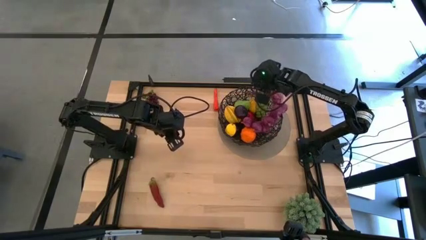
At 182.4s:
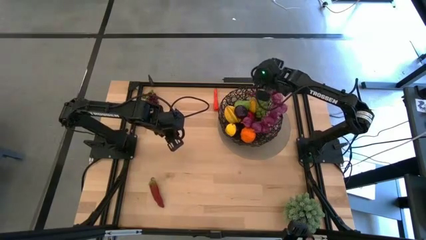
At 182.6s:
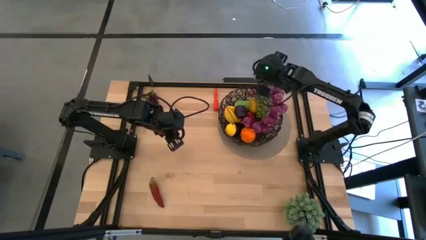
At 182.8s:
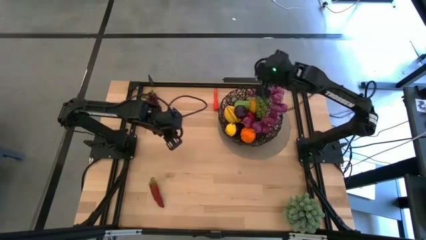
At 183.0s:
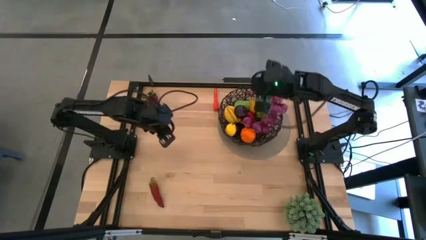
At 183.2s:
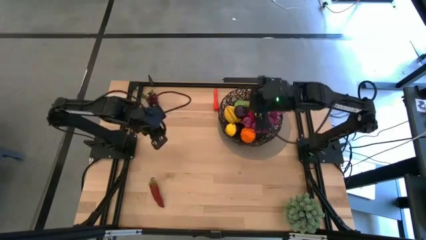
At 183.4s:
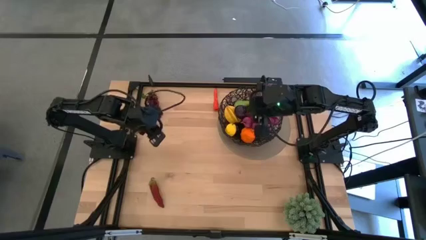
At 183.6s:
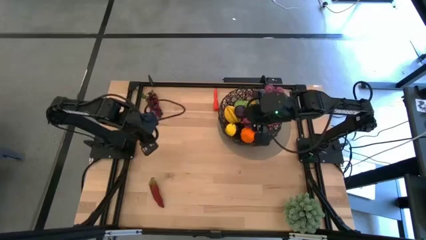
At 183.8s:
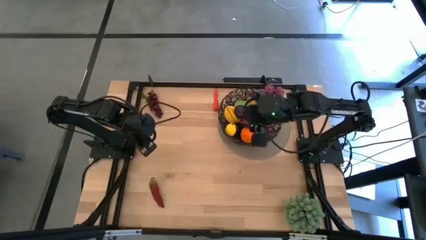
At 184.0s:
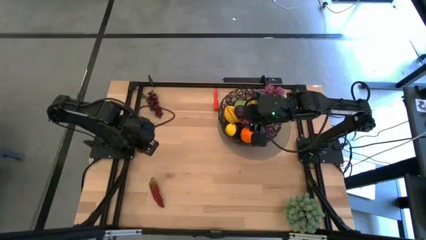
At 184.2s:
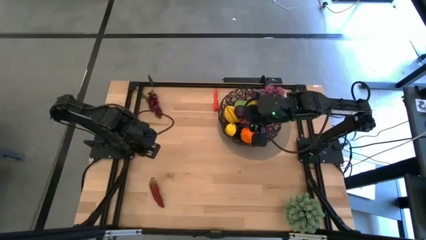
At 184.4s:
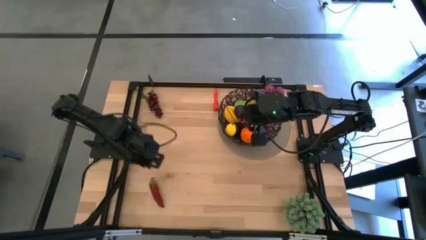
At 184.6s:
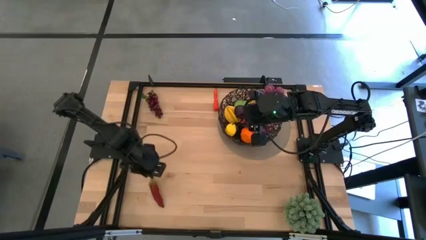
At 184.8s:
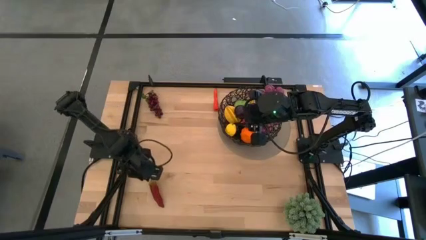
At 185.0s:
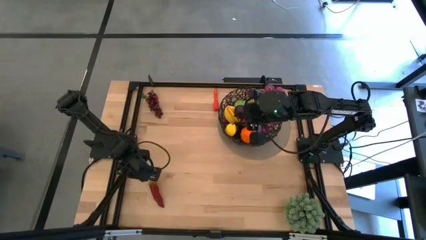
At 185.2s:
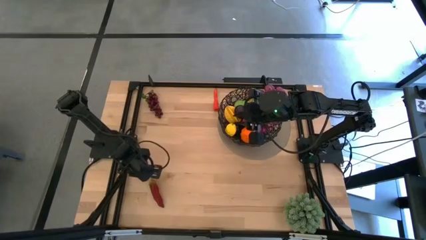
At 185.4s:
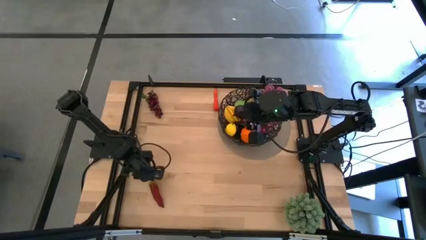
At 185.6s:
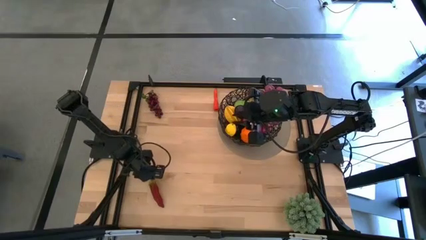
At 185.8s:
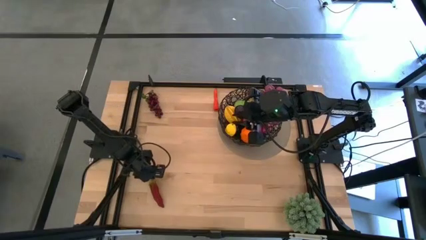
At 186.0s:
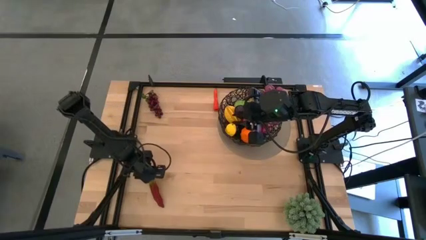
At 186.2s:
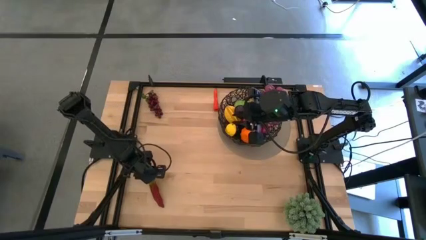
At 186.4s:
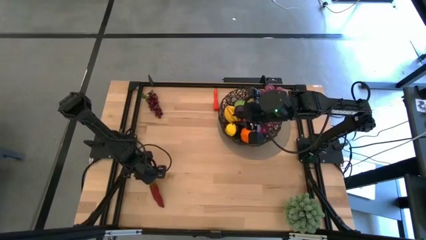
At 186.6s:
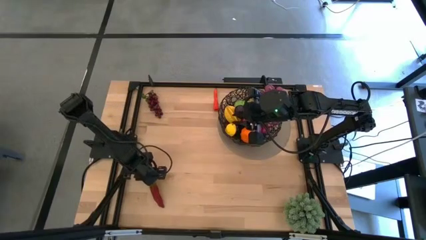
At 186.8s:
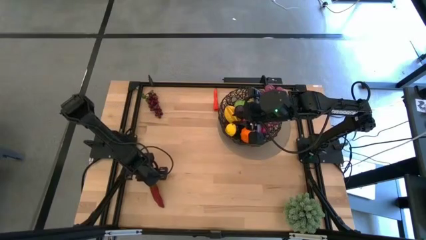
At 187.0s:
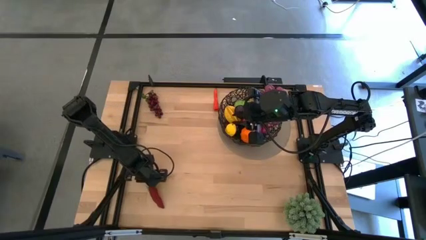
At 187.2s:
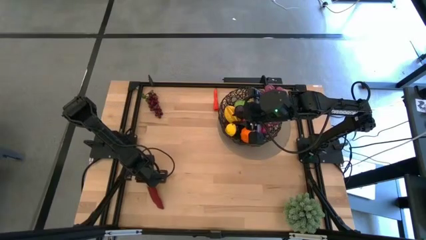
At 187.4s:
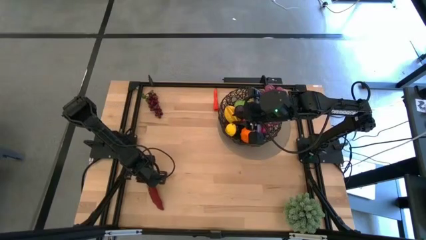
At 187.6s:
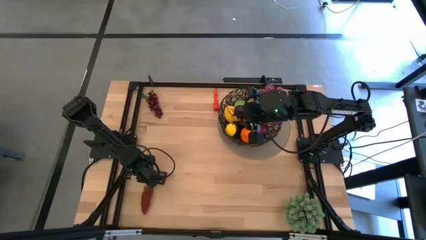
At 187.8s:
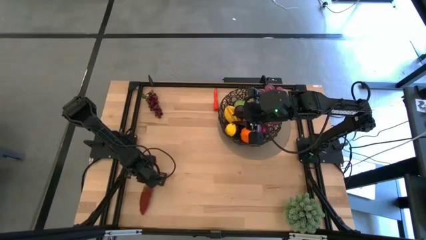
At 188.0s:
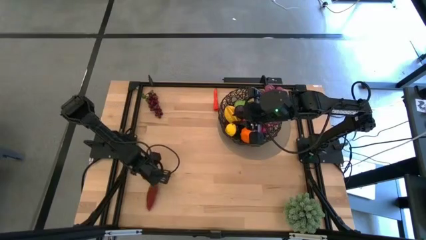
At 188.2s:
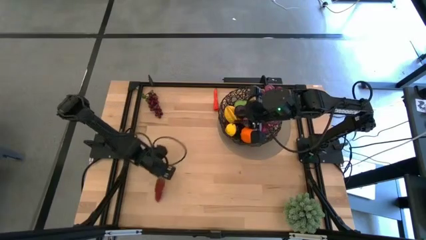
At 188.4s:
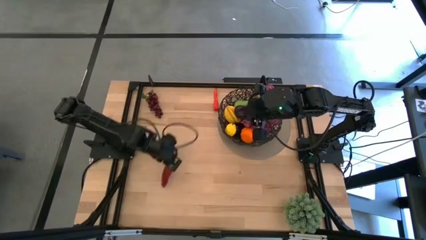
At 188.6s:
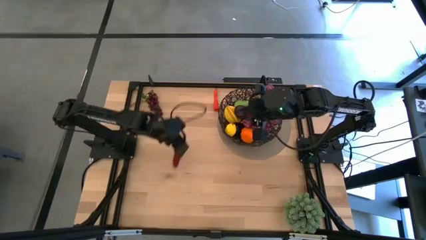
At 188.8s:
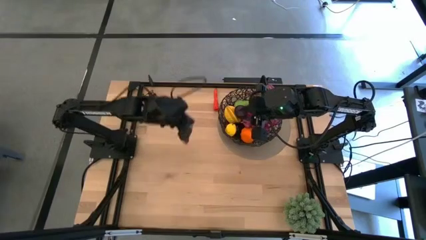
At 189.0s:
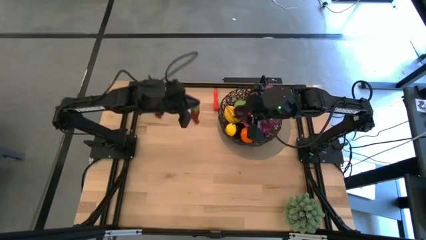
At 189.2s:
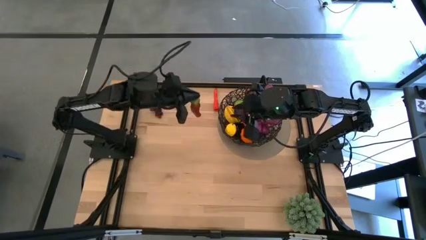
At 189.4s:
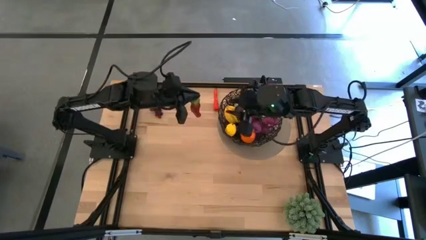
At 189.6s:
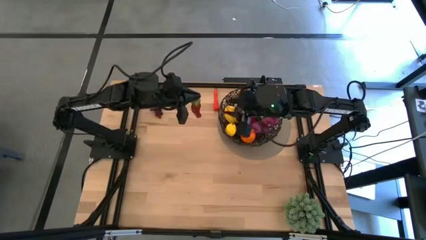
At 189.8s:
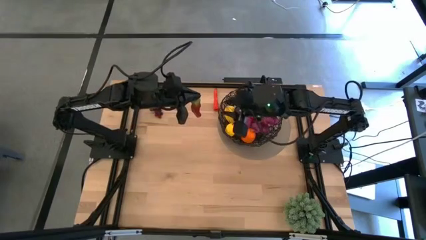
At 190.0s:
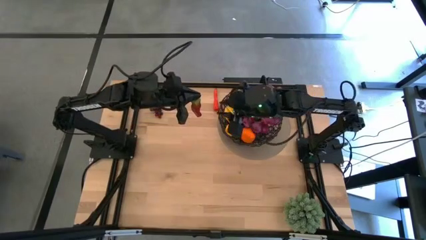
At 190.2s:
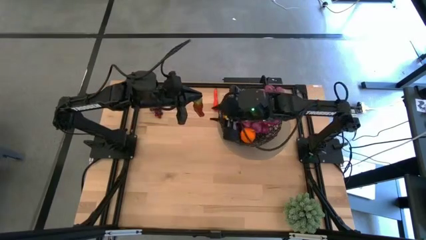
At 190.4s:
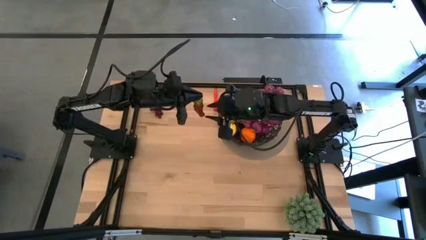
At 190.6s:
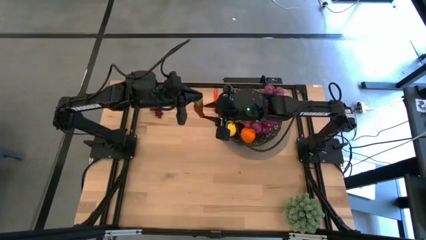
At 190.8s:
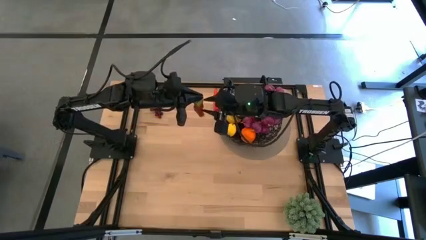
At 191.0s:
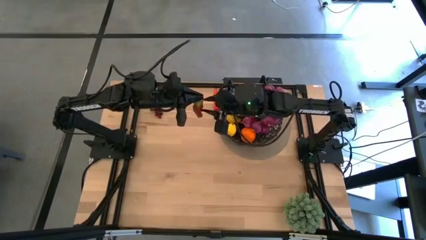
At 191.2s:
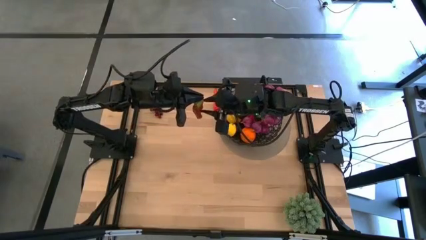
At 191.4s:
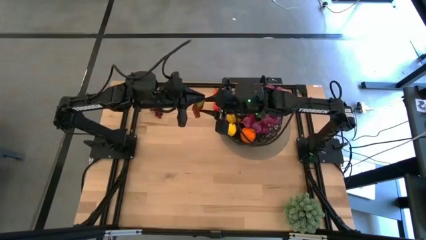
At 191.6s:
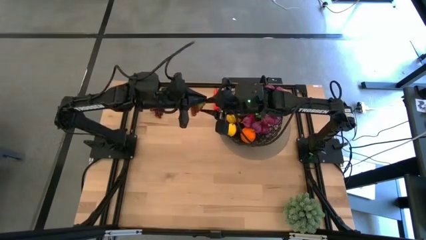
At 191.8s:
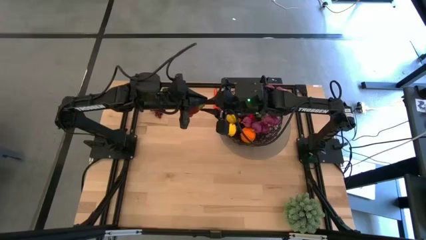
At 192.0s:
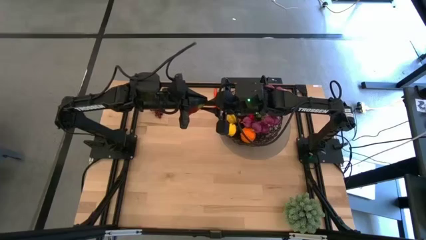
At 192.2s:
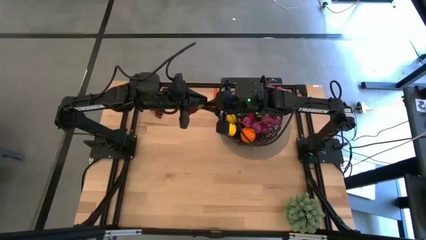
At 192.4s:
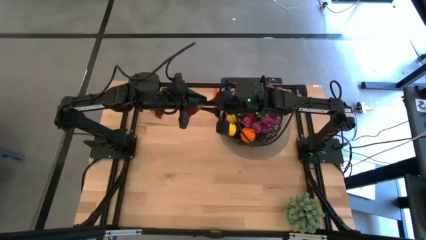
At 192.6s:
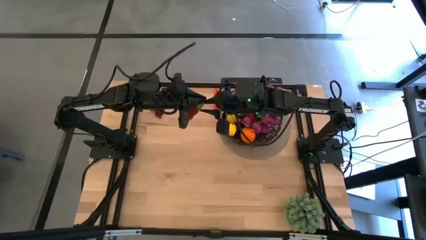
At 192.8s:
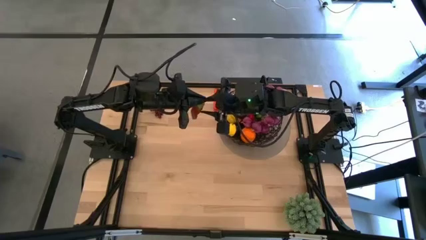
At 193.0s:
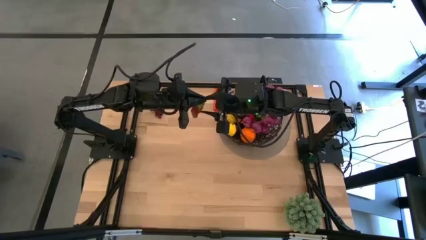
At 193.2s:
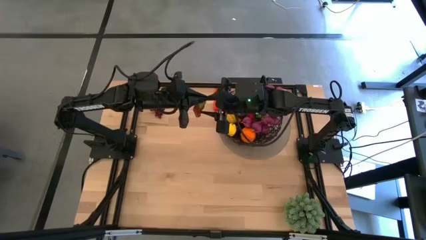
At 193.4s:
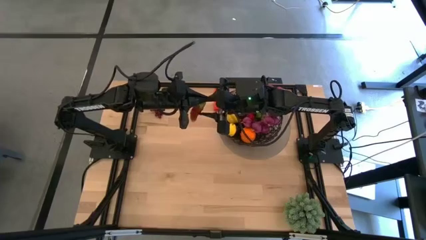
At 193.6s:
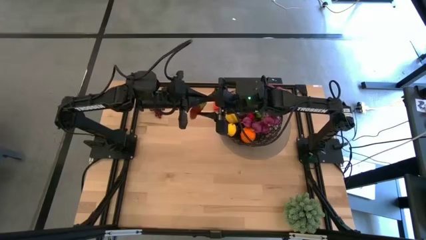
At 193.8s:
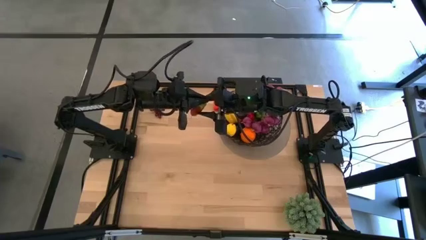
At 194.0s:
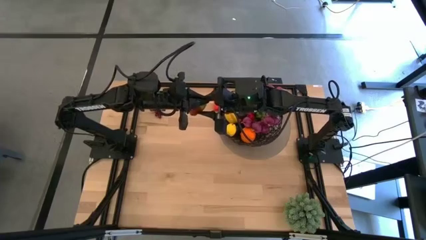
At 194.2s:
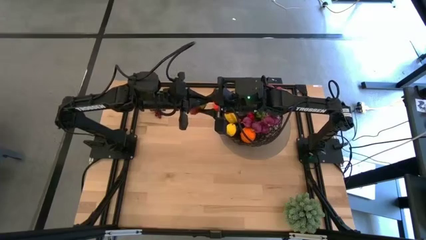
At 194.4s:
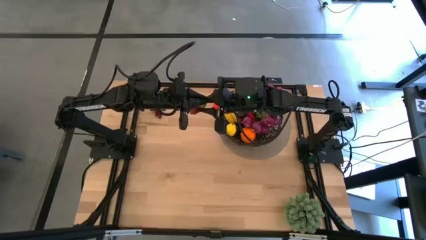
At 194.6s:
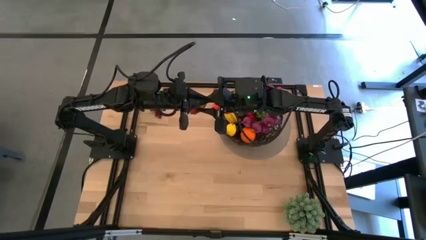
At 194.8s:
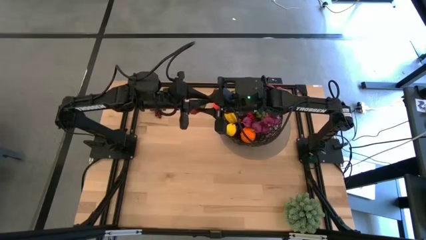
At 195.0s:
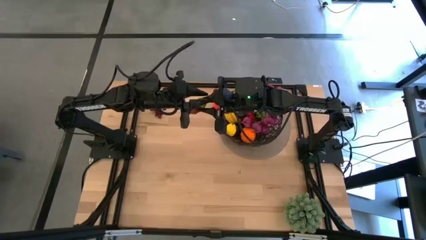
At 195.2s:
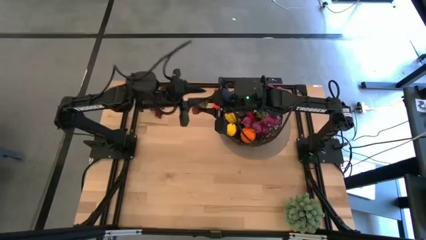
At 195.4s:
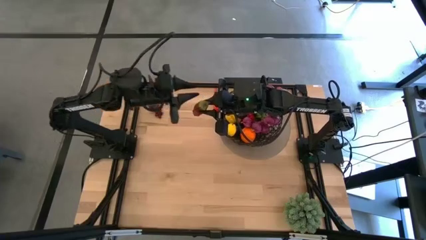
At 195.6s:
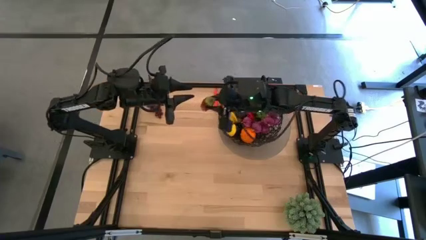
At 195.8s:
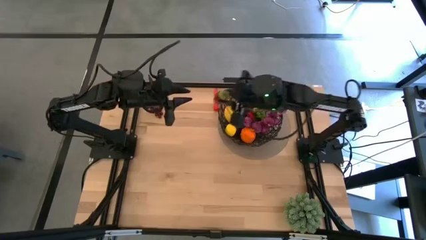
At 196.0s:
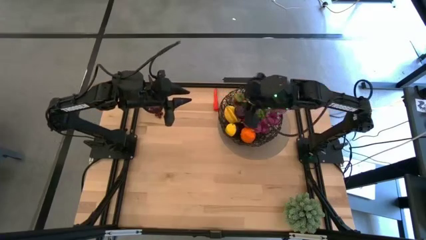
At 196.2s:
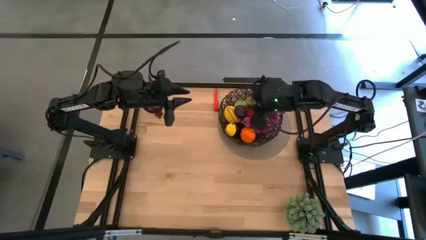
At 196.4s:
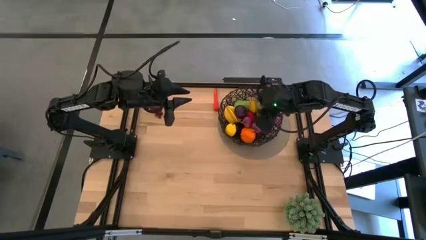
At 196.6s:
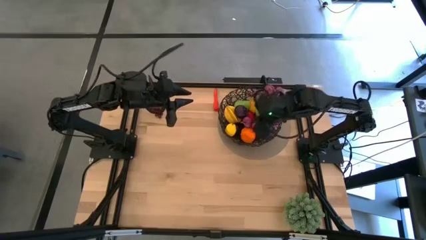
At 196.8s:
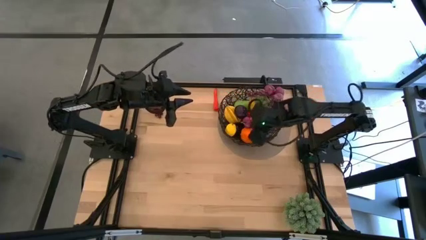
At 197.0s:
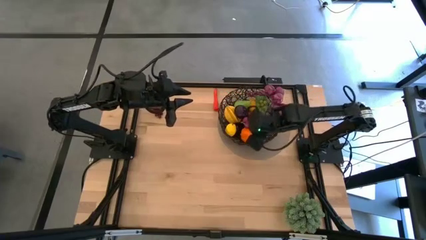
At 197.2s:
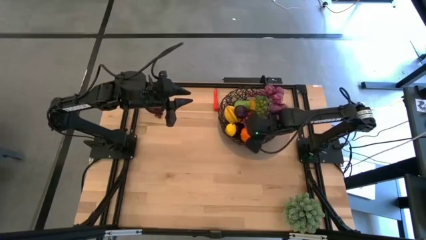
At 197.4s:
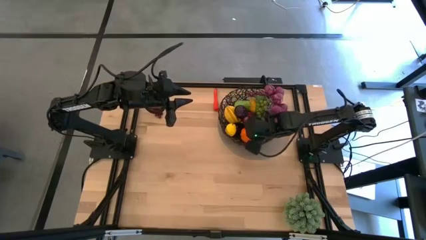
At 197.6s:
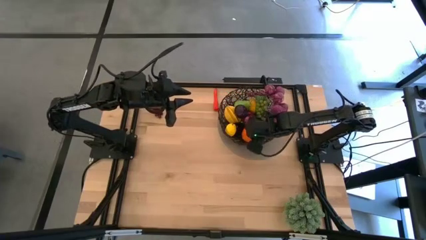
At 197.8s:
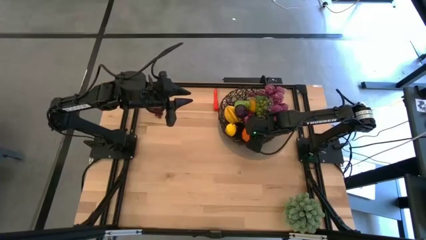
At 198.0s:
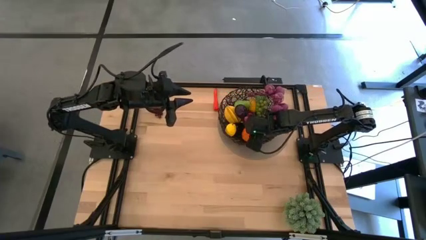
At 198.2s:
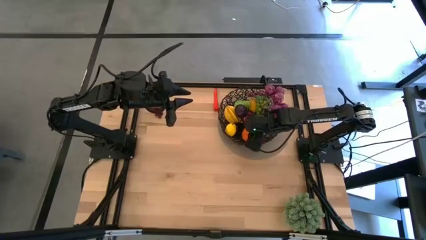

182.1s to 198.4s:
Task: Build produce basket
Put the red chili pepper into the black wire basket

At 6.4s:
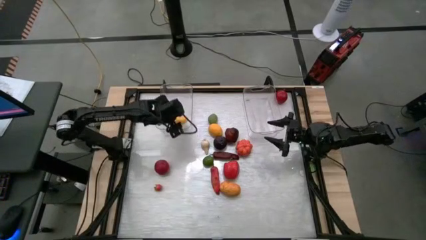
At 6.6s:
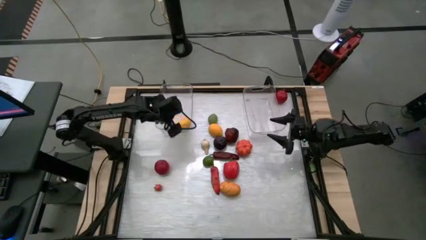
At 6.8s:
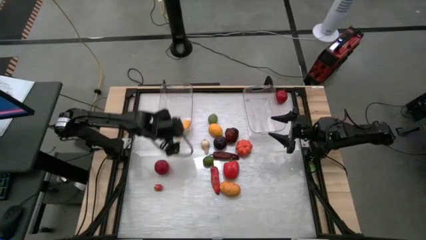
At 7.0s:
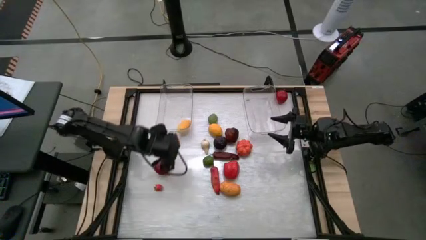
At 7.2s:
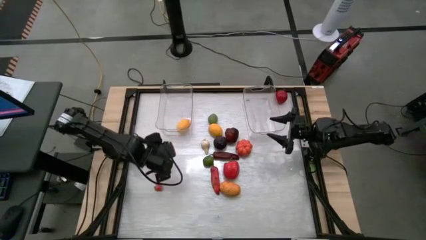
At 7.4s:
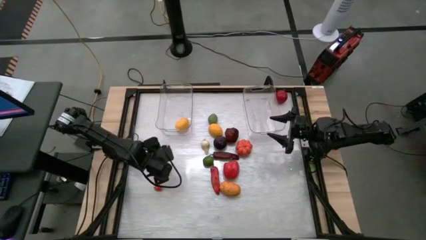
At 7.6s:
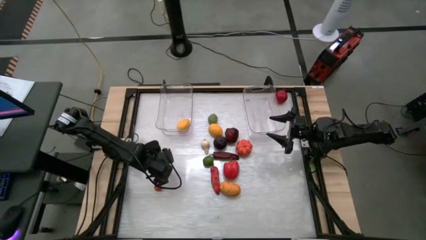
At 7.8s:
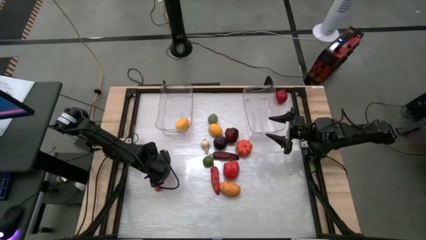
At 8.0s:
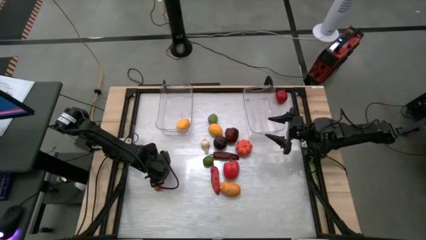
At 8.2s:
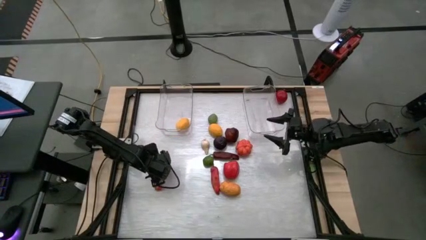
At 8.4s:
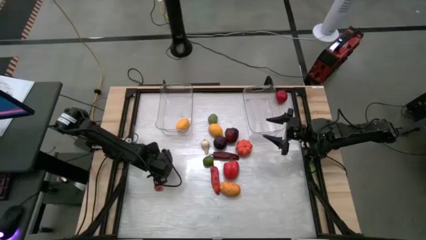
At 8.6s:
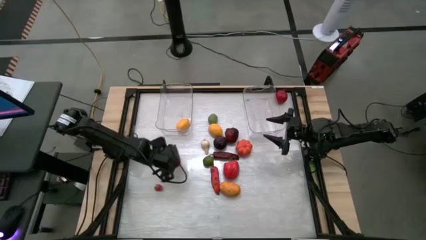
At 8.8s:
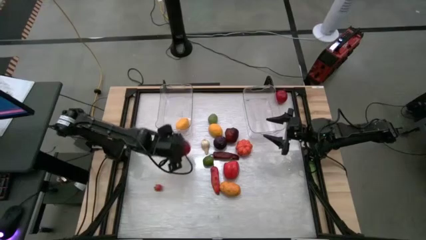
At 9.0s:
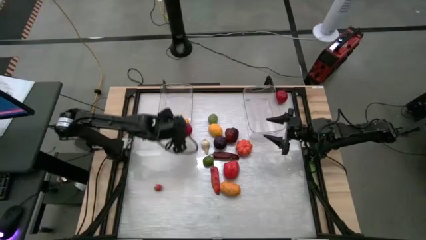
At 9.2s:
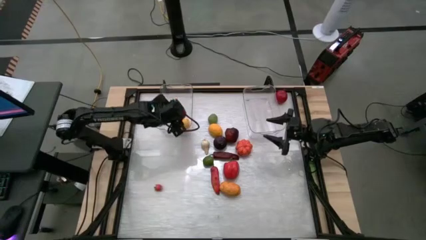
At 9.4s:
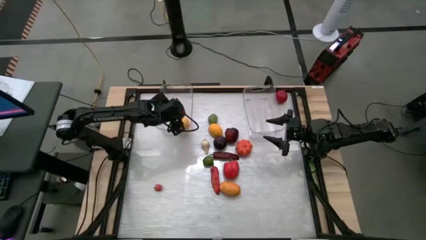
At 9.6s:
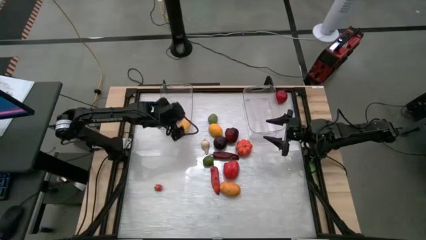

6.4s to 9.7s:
Task: Sort produce into baskets
Put the bottom red tomato into the left transparent bin
